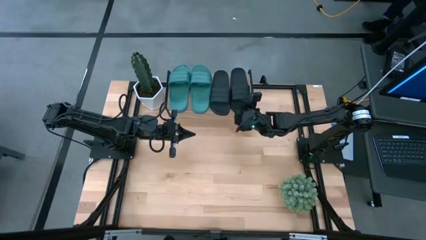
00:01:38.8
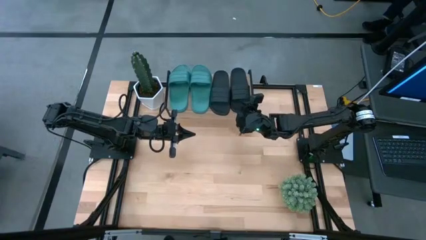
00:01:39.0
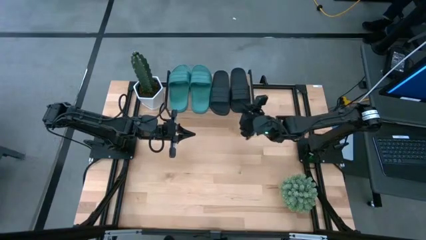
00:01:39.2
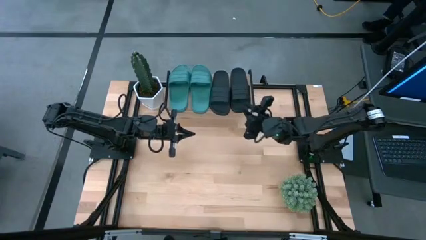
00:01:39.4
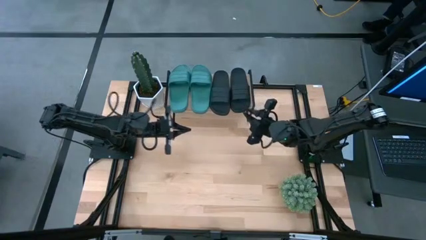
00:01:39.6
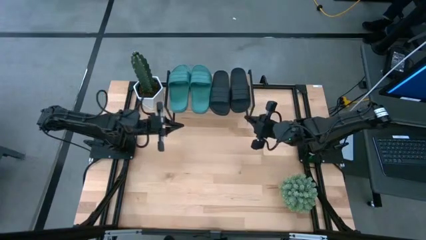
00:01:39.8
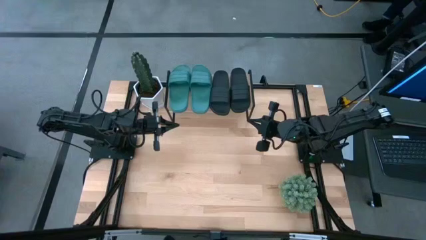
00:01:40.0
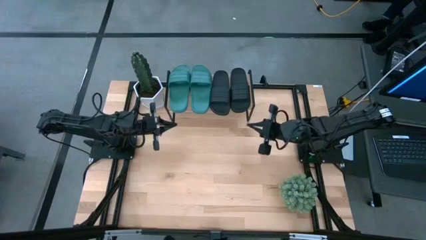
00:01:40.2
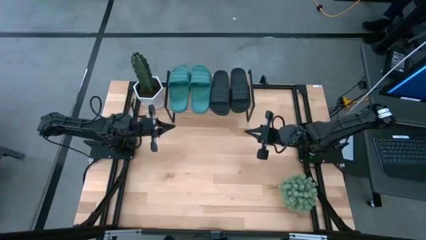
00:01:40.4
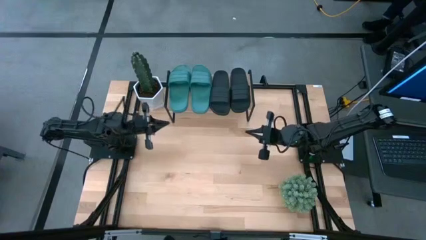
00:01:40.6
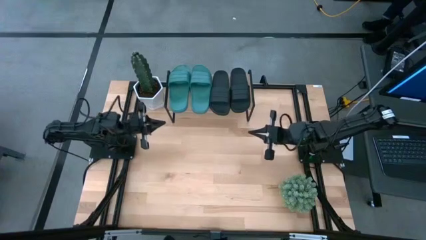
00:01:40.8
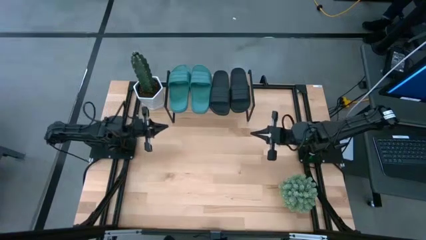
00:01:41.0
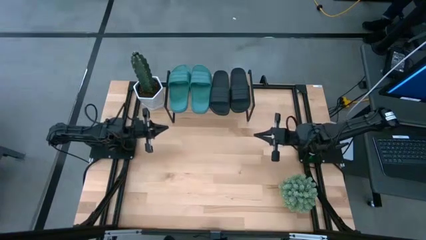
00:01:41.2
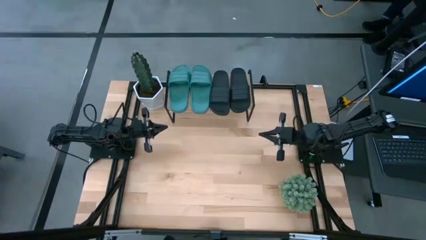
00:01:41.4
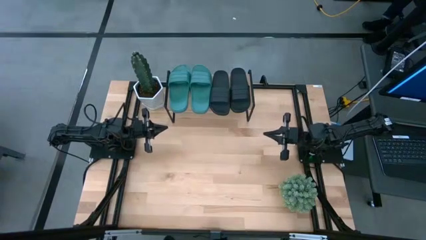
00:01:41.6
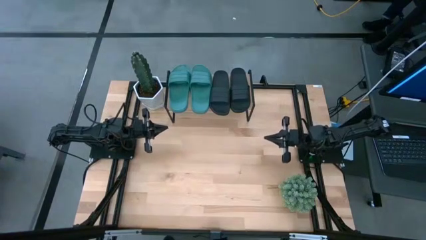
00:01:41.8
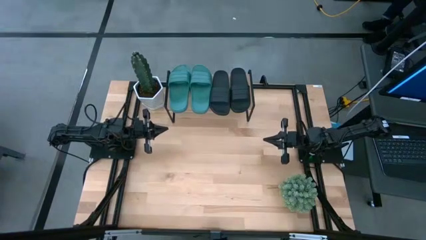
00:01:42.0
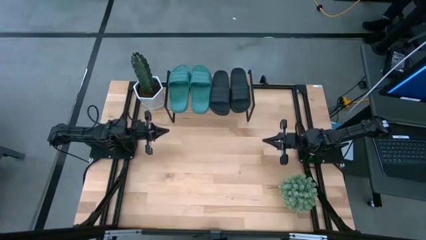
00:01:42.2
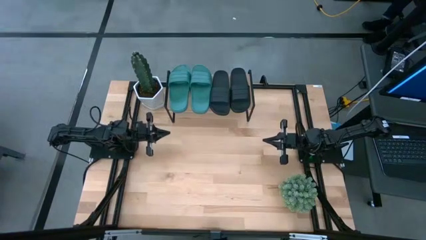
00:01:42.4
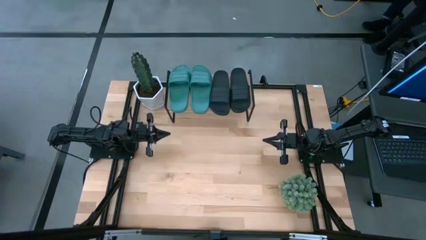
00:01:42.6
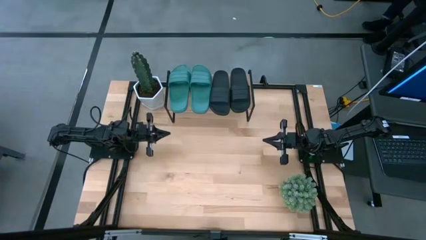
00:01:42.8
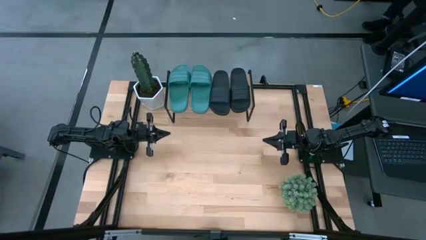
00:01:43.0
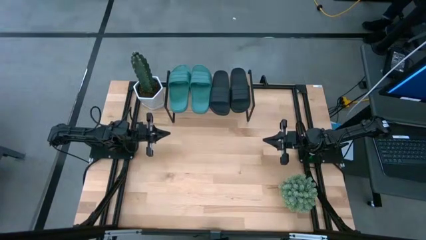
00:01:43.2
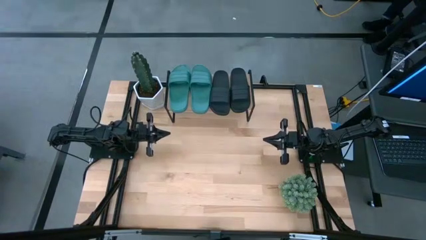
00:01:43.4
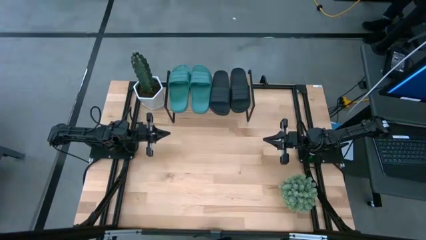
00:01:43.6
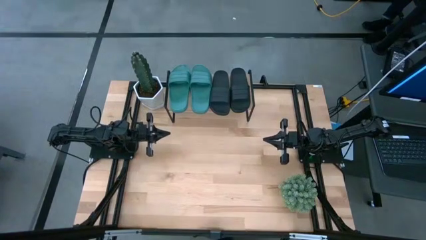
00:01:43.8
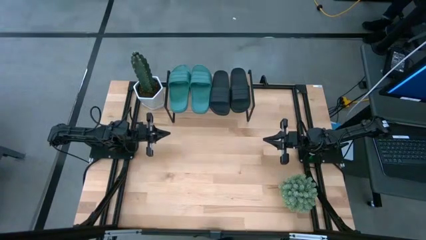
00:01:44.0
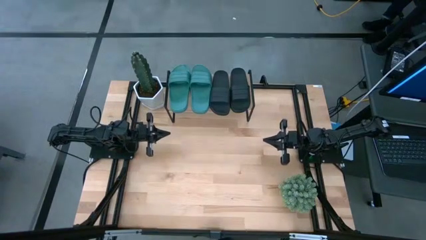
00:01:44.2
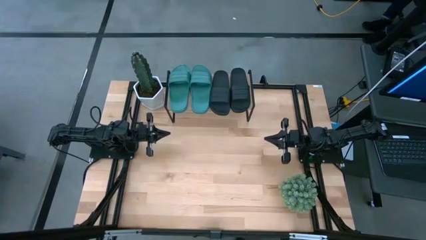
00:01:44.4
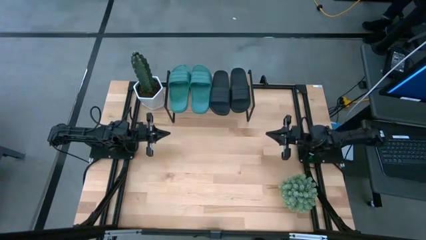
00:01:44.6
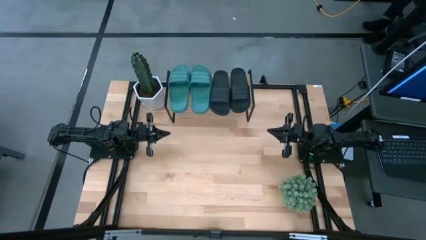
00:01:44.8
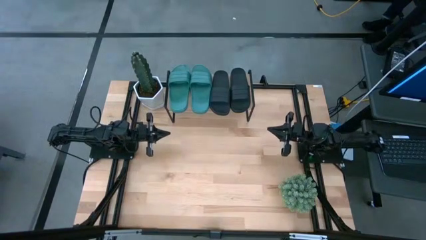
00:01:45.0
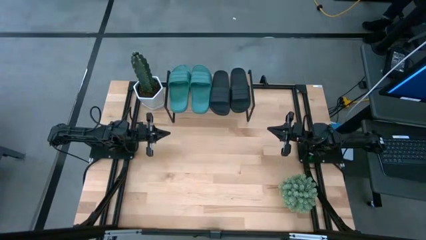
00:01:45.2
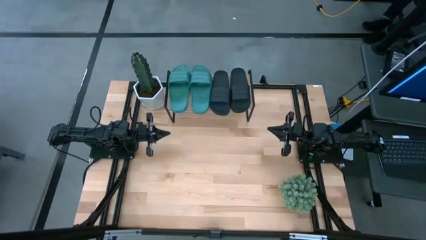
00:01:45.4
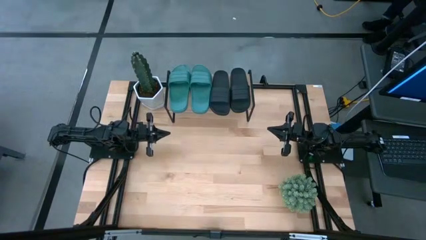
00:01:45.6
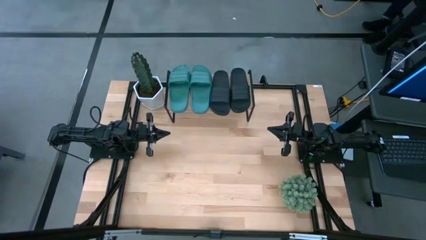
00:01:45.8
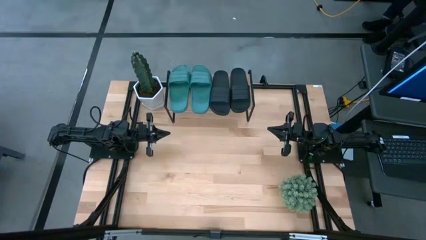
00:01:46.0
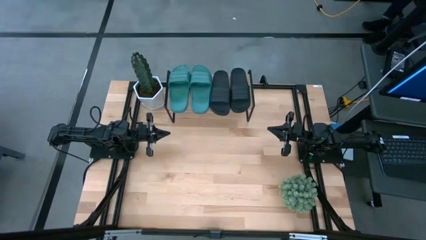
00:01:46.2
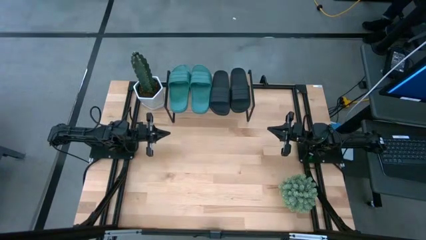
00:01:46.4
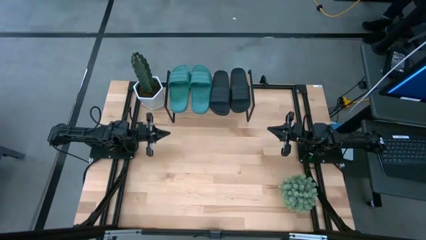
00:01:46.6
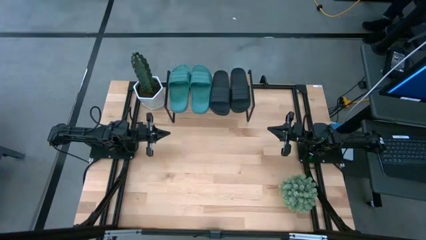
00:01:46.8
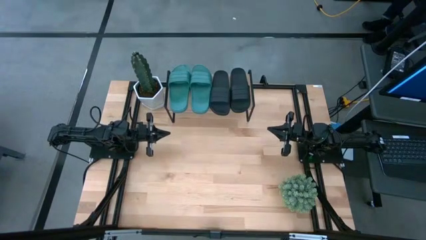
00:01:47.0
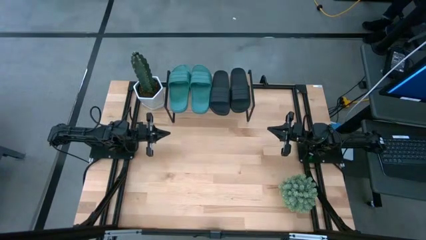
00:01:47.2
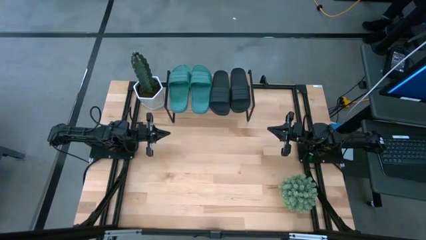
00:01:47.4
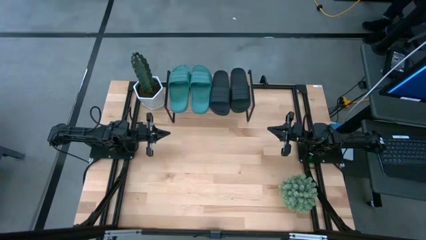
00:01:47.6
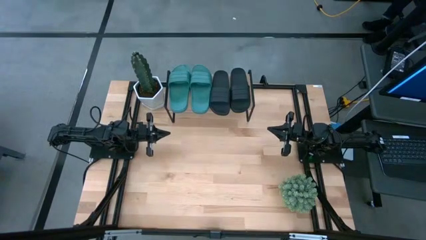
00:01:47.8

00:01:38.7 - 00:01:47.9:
Task: Pick and place slides into the shelf
Return to Home Position

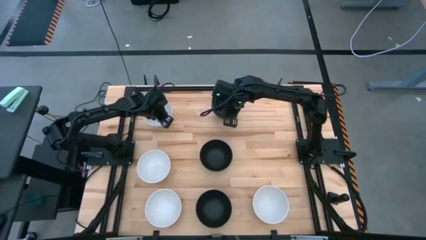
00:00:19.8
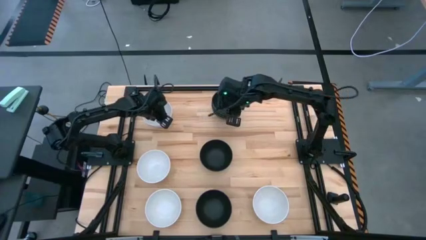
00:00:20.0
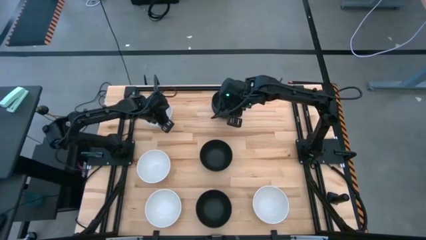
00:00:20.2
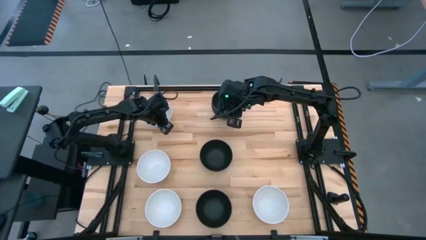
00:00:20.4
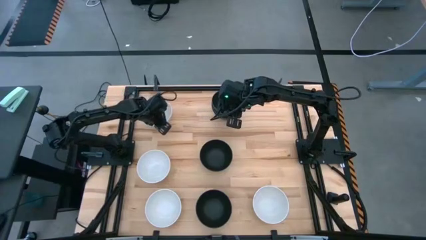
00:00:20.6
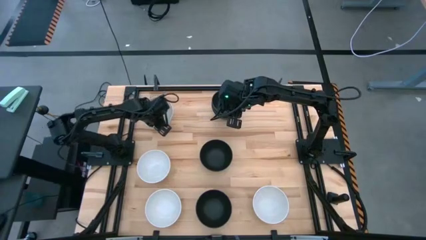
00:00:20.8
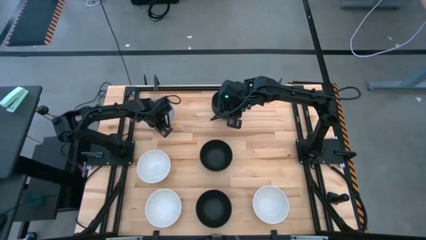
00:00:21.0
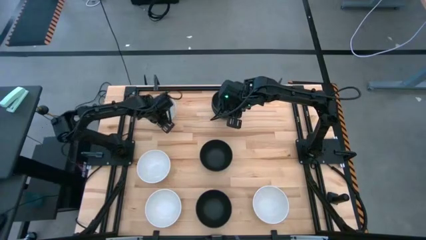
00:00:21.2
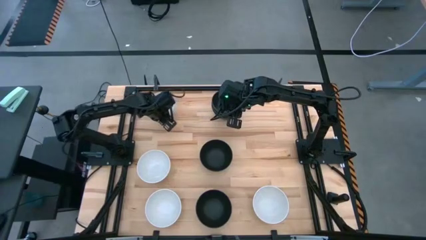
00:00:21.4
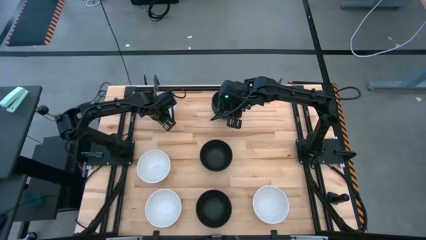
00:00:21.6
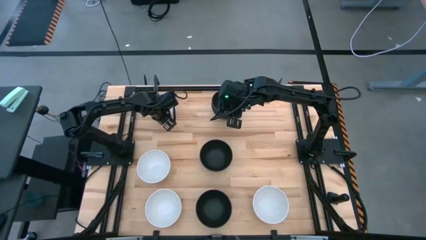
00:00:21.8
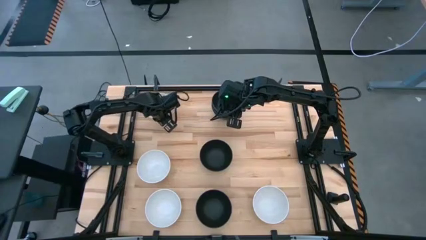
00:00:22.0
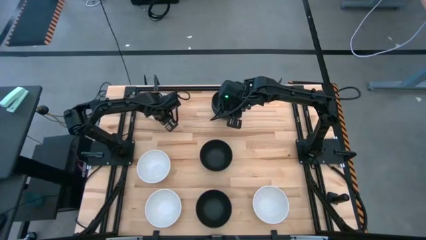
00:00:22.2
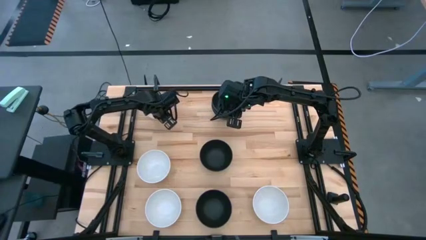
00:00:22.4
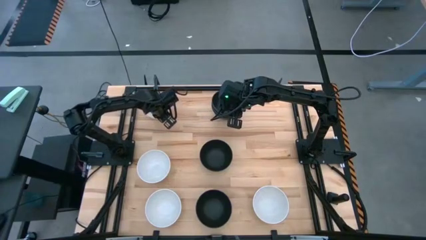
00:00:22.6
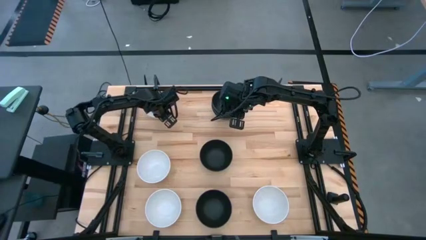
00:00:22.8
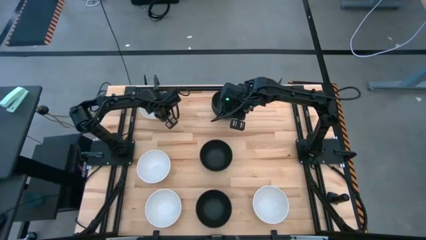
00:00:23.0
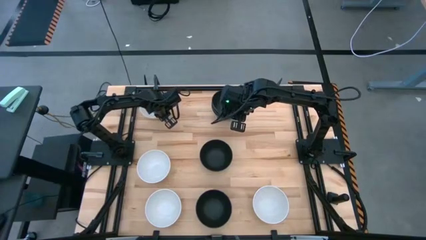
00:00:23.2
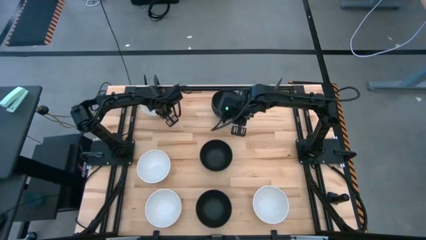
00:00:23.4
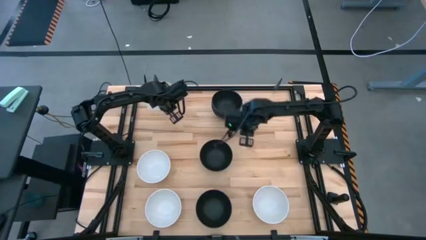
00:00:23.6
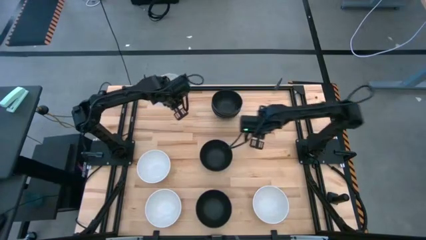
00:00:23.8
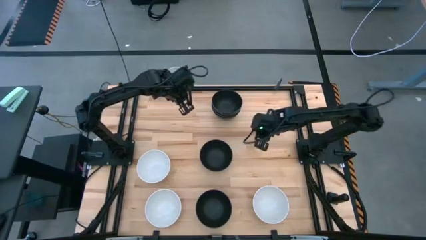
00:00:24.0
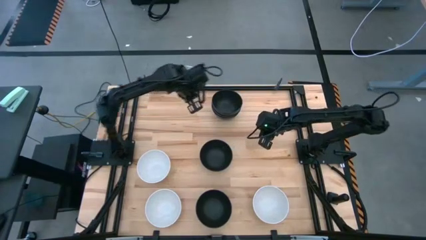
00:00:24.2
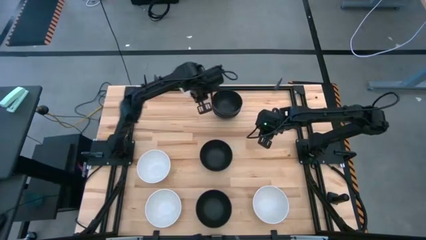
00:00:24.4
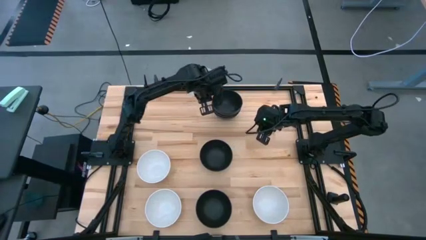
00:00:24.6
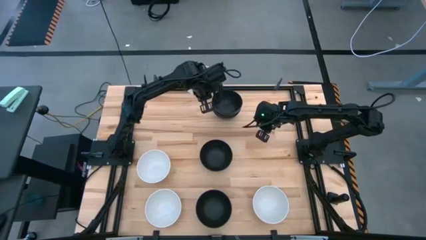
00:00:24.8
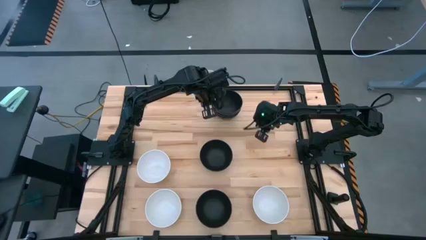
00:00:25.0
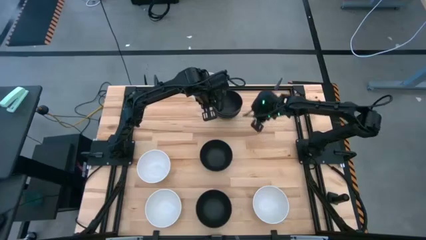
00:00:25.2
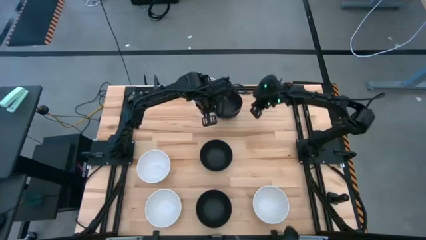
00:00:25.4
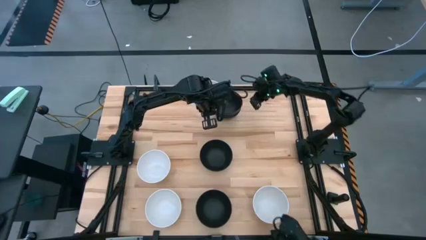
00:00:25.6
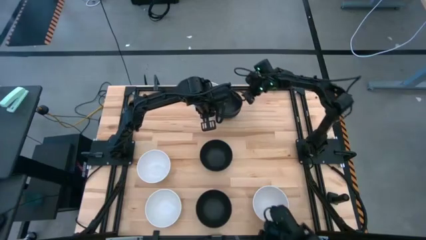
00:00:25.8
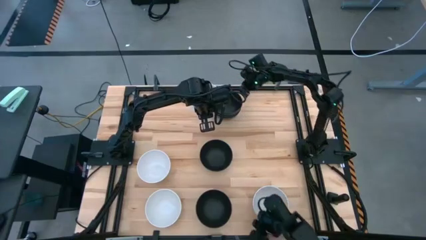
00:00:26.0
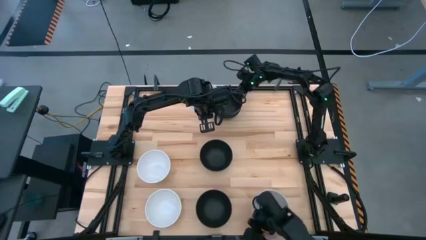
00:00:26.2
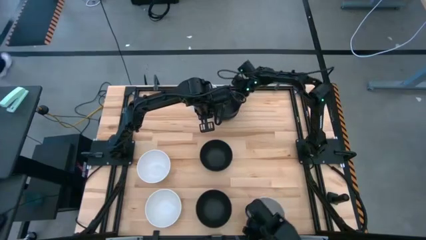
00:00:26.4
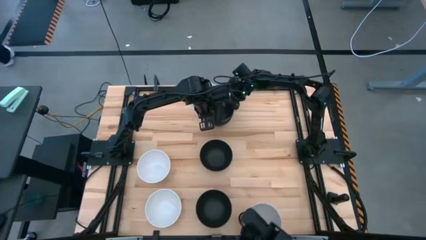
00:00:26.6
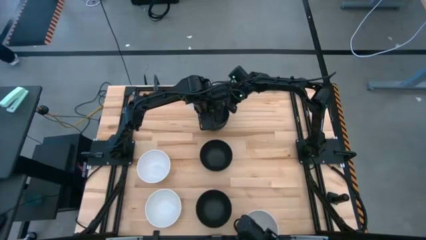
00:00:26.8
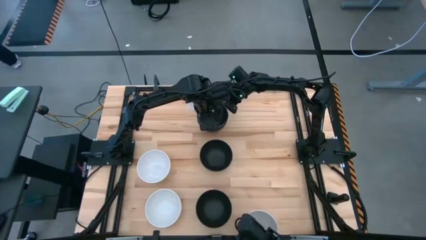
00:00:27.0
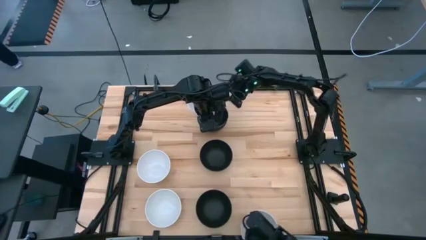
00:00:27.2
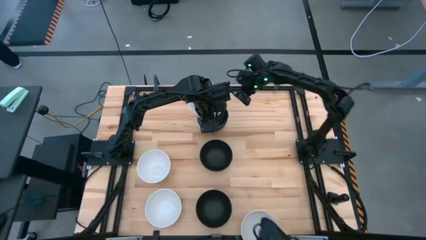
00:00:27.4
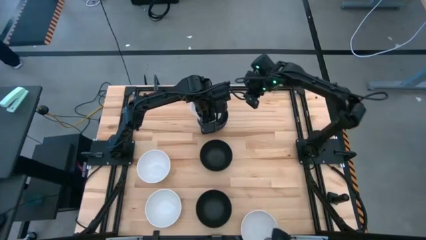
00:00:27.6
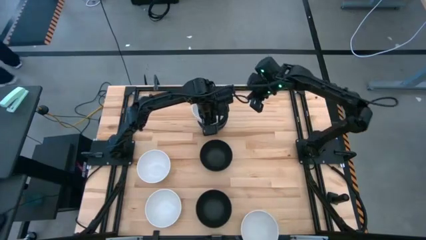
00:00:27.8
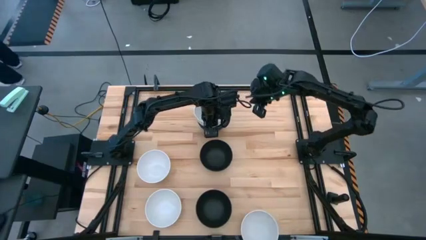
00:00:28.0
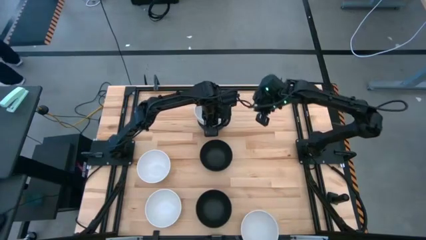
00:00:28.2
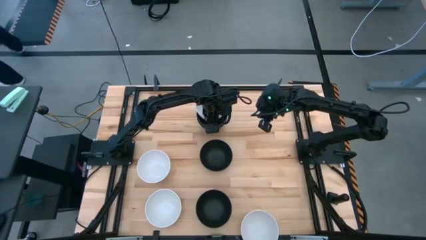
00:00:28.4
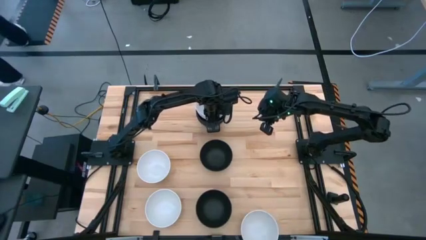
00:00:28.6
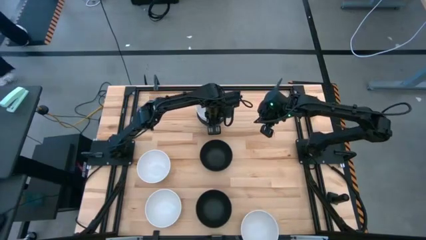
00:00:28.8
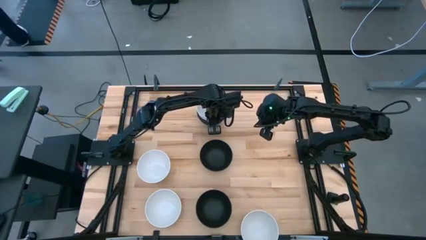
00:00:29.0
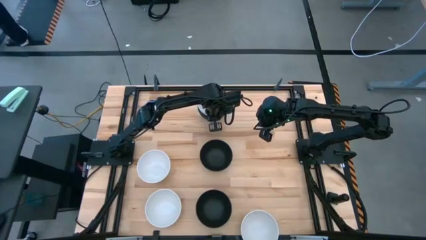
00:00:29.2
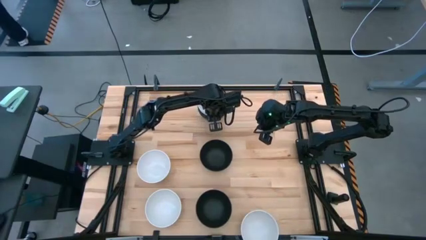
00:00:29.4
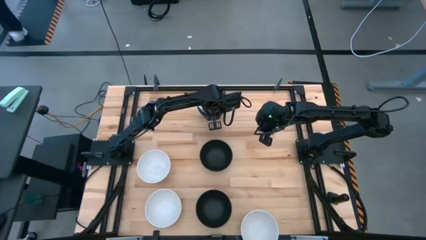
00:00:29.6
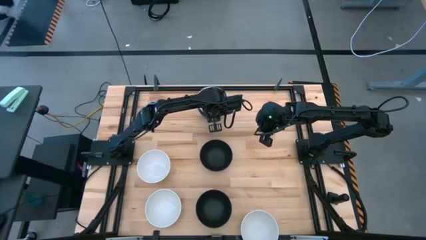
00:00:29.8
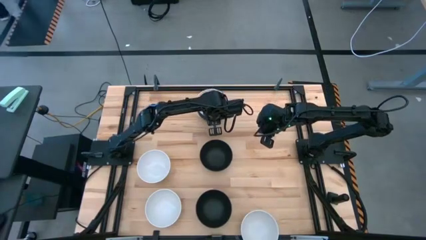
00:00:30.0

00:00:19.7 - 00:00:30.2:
Task: Nest bowls inside each other
Stack the white bowl on top of the stacked black bowls
